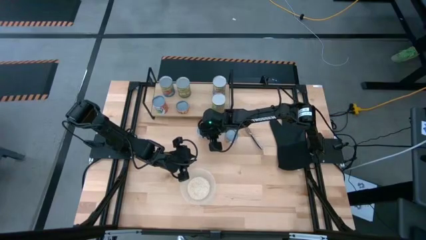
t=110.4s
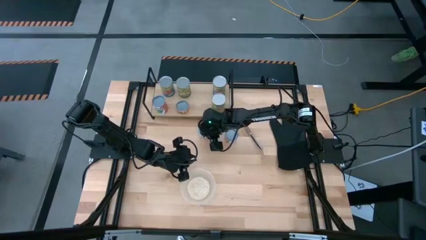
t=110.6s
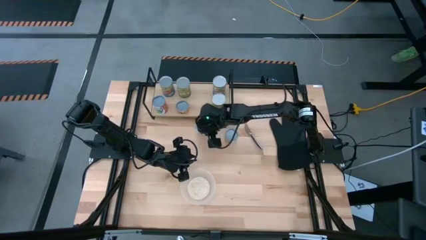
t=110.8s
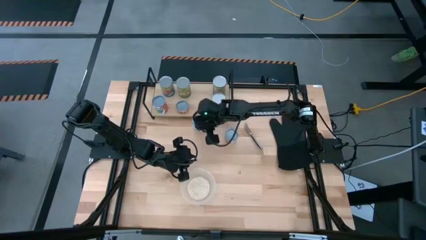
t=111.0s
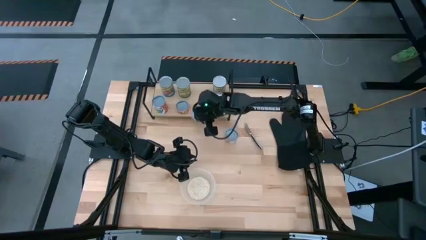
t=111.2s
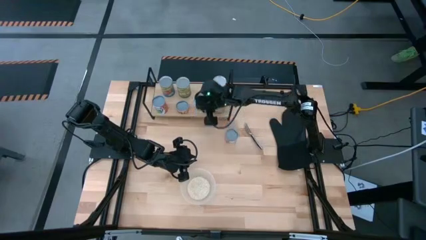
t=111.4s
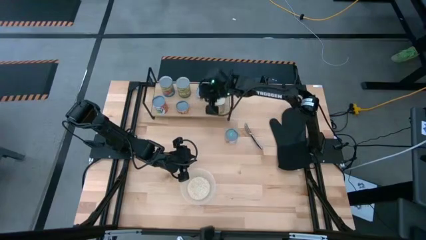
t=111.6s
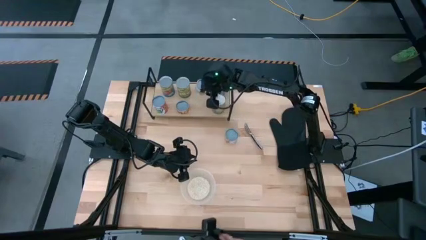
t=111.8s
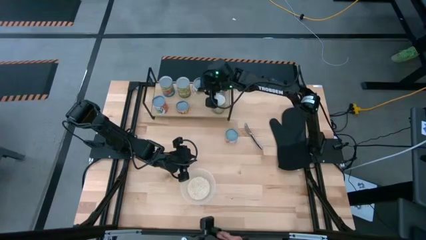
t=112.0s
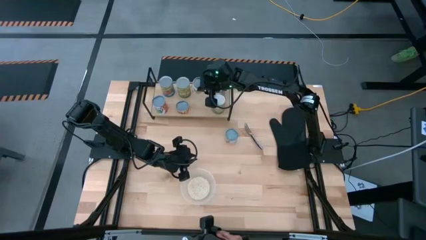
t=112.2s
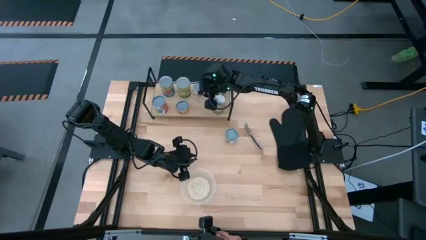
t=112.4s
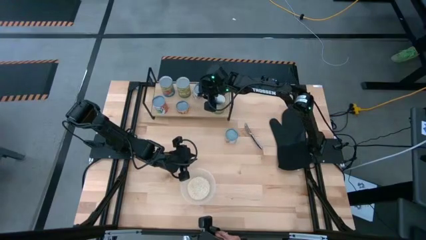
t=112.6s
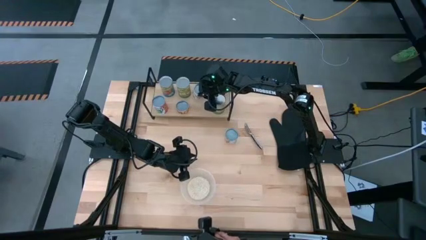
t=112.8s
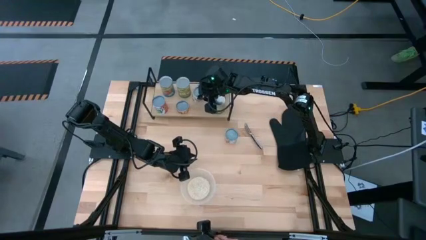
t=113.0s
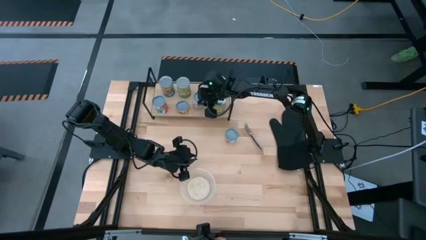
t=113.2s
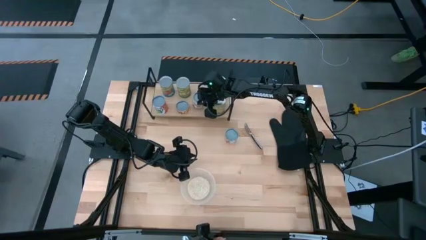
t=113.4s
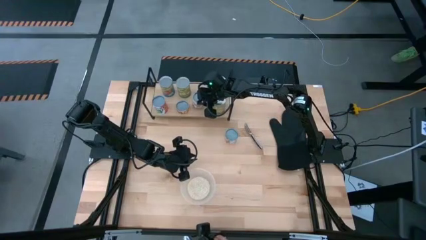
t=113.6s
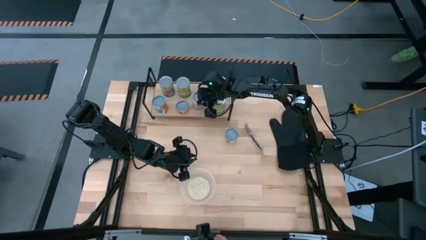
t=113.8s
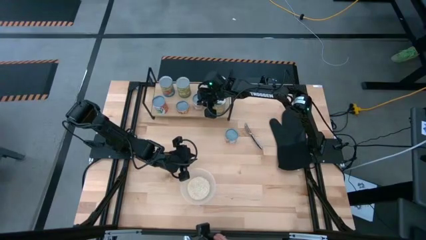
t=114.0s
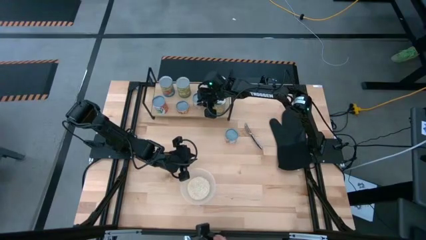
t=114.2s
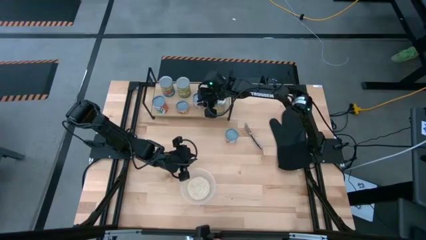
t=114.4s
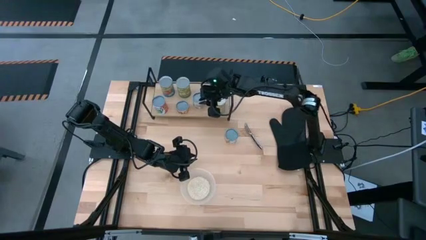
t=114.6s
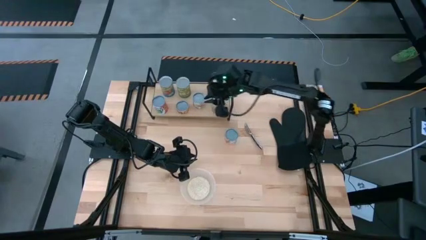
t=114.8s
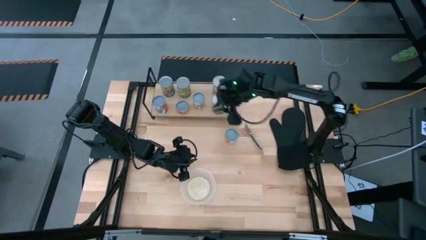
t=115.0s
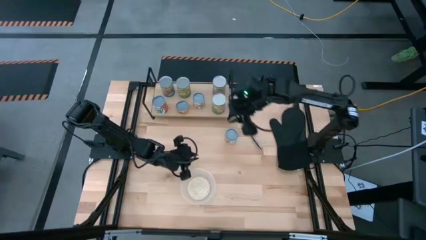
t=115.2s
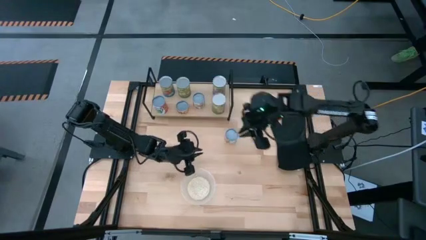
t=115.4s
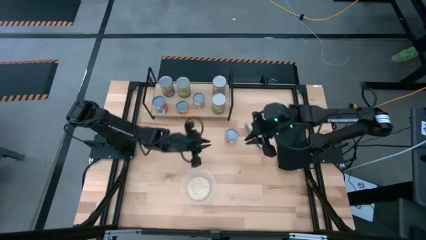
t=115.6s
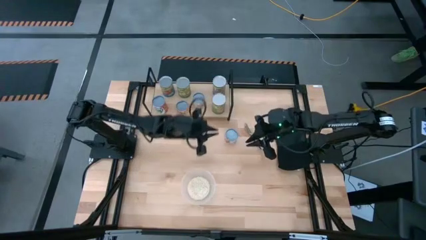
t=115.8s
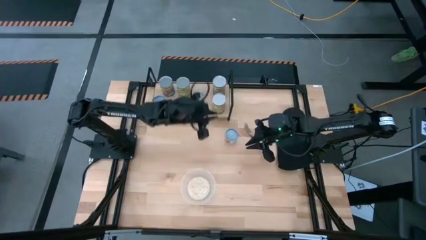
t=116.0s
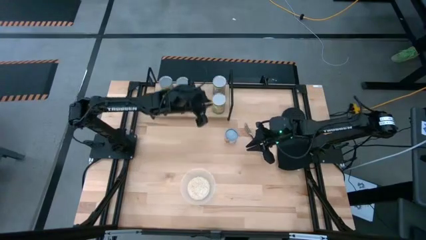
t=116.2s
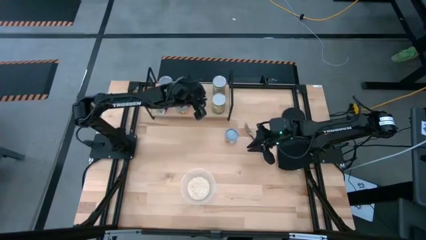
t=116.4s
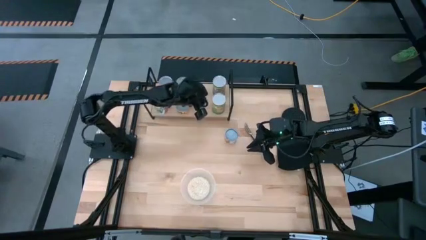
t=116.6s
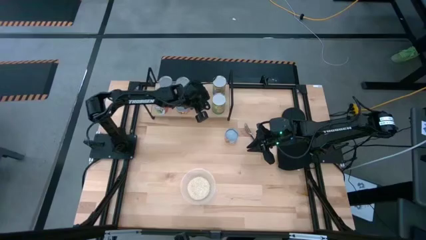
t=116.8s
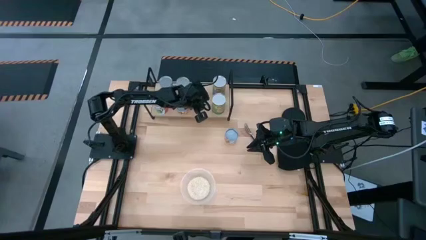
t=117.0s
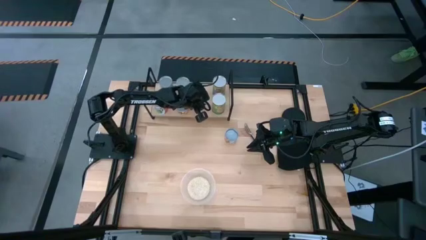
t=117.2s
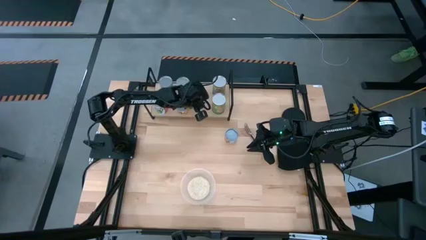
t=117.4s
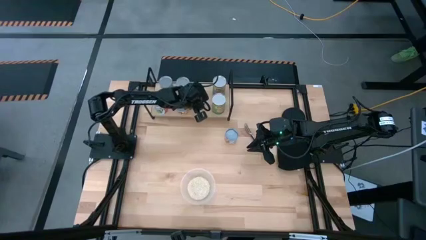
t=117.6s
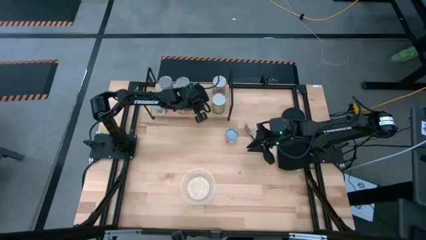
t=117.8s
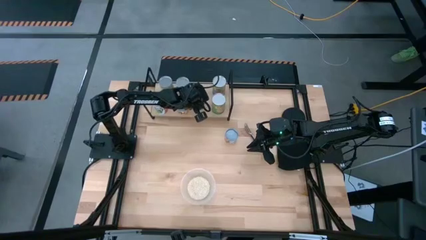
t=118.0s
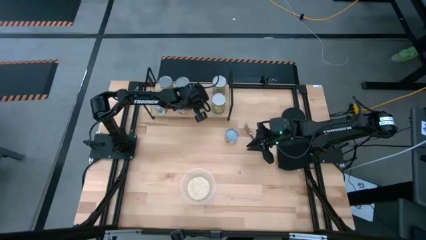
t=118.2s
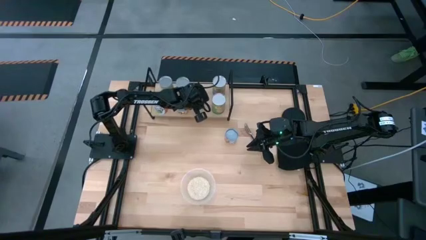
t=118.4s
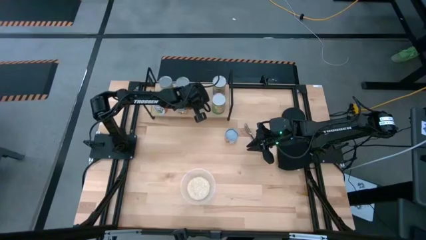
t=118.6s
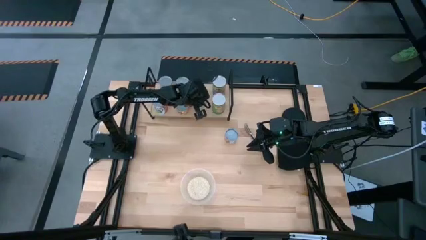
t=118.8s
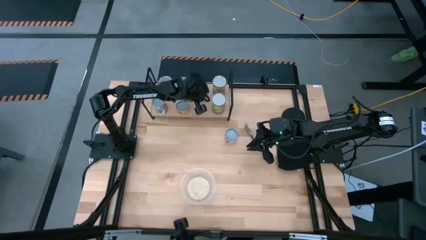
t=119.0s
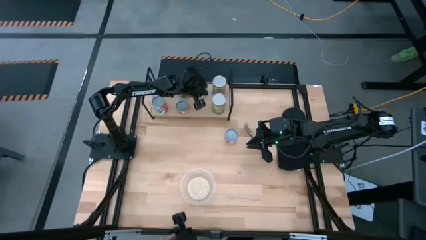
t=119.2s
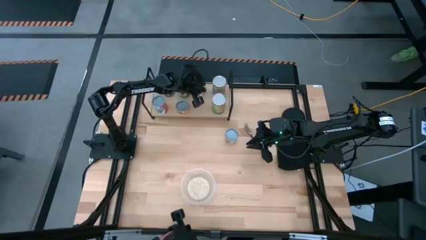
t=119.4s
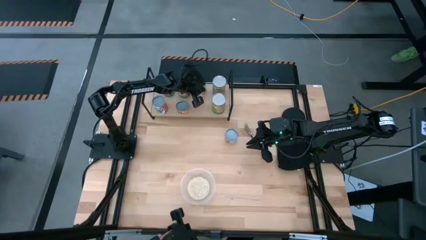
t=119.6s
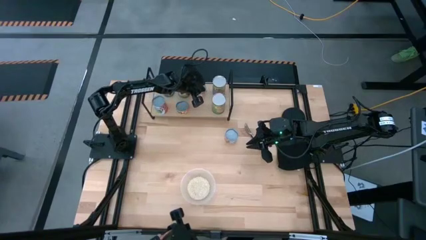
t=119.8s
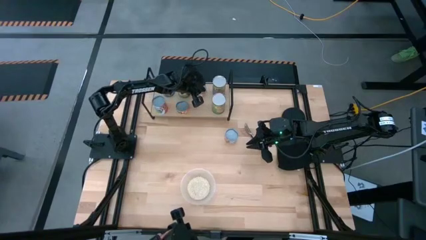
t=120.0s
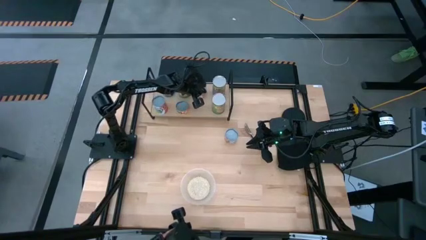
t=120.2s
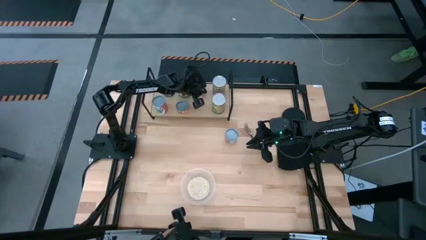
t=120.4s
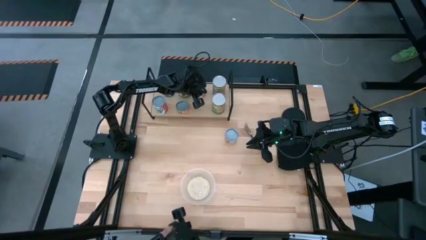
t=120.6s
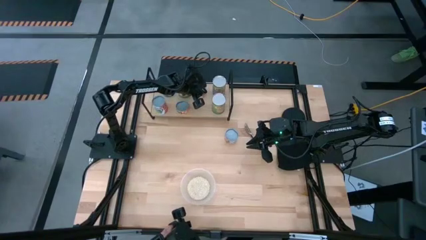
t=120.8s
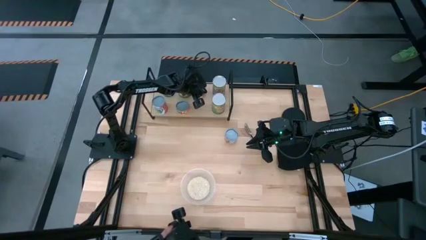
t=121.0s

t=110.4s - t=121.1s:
Task: Pick and place cans onto a shelf
Put the canned diced tomatoes on the shelf

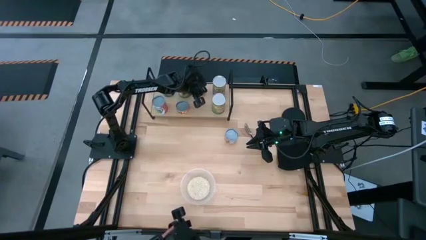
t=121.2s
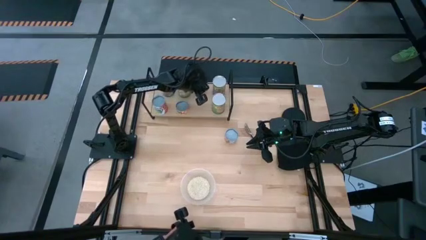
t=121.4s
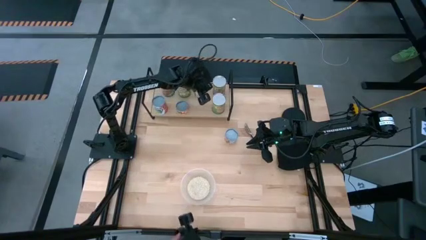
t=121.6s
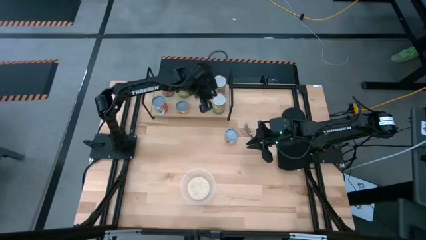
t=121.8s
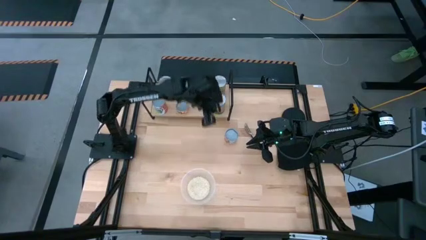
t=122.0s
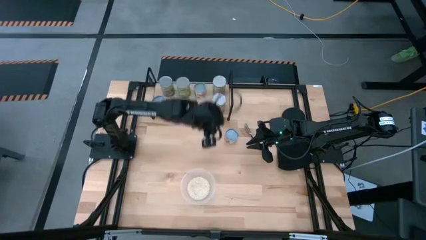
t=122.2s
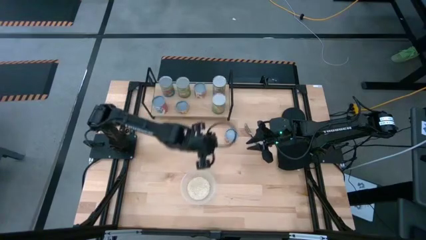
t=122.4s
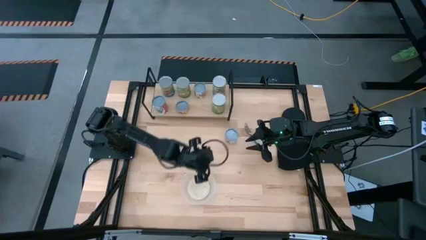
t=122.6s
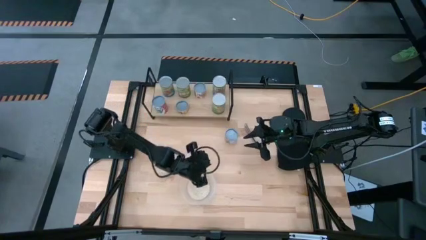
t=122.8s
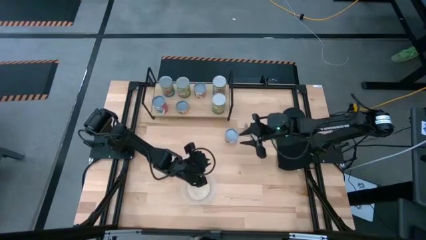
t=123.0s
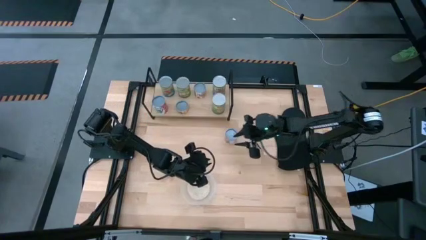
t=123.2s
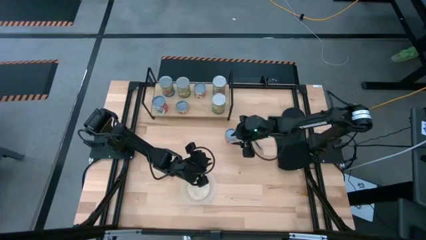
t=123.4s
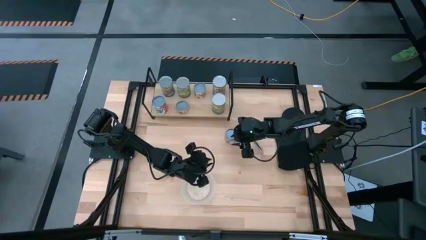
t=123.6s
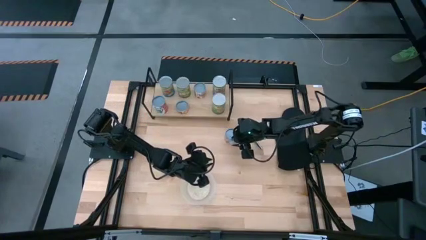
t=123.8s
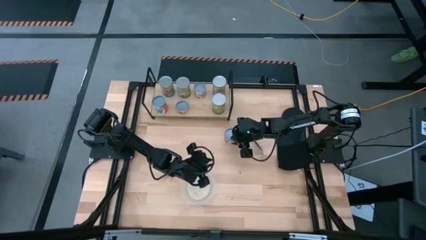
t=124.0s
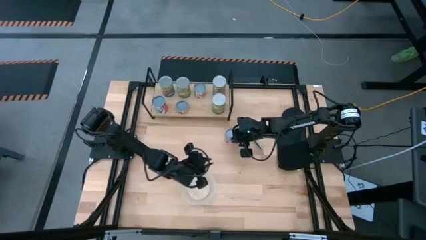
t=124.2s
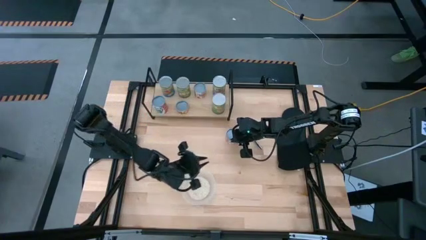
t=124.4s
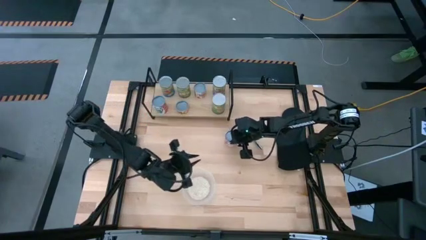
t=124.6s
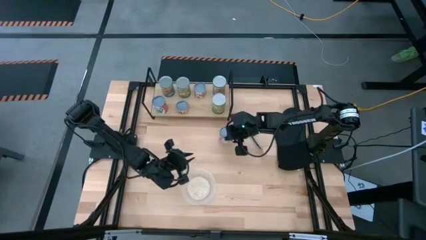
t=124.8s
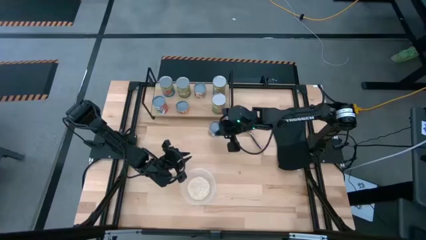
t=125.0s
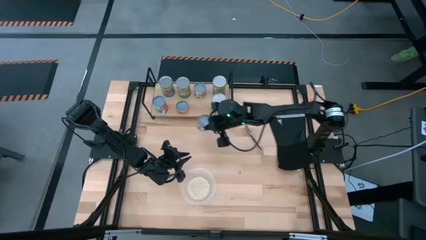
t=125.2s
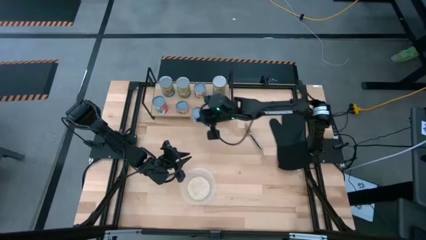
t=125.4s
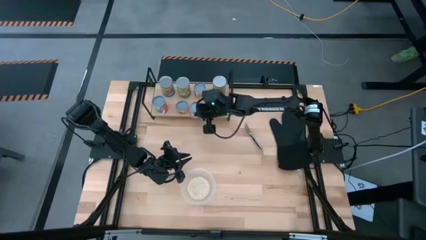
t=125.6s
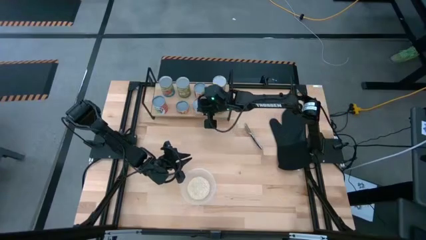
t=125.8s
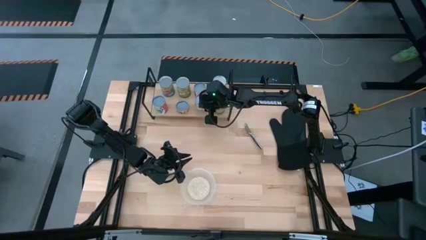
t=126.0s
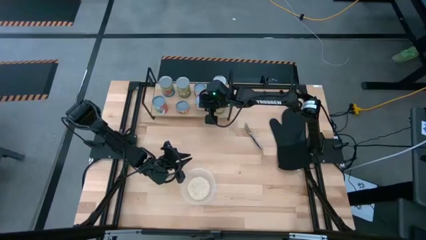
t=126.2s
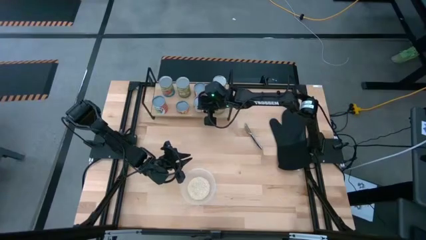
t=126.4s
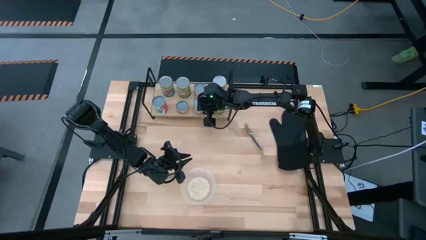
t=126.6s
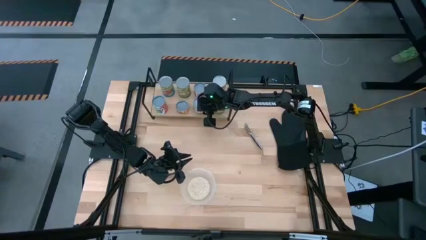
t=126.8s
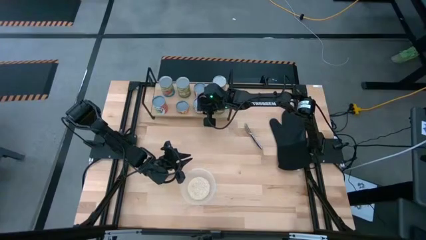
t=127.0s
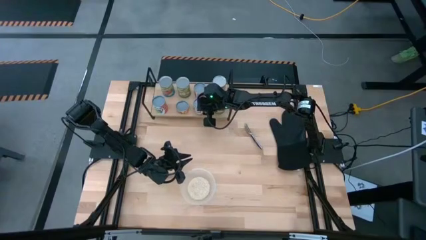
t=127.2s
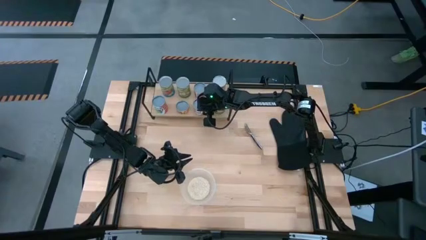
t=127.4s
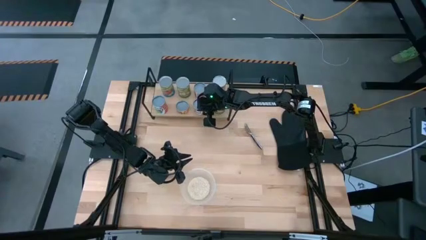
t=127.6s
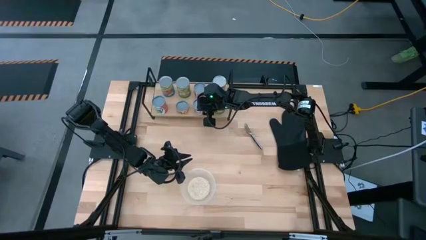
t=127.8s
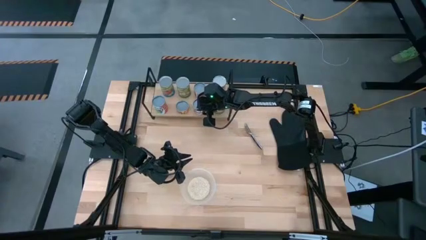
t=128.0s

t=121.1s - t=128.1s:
Put the small canned oranges on the shelf
